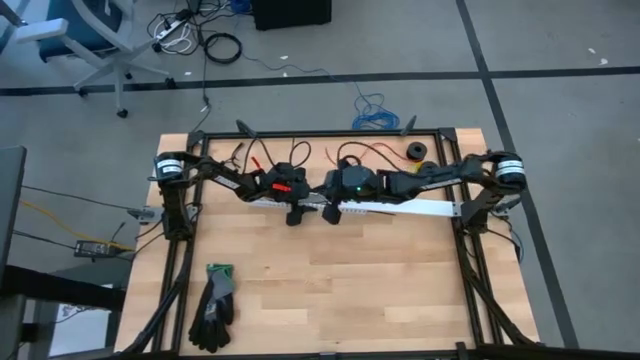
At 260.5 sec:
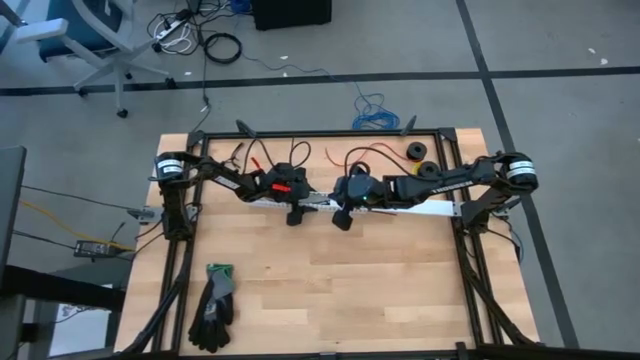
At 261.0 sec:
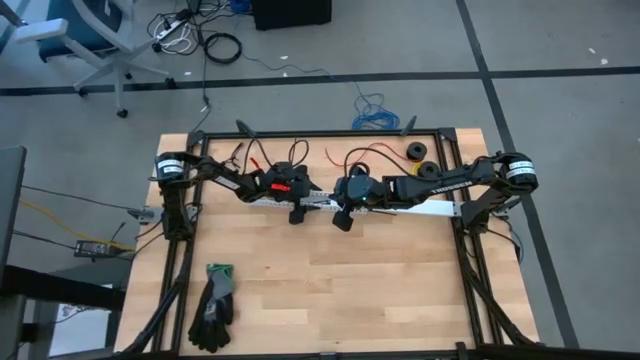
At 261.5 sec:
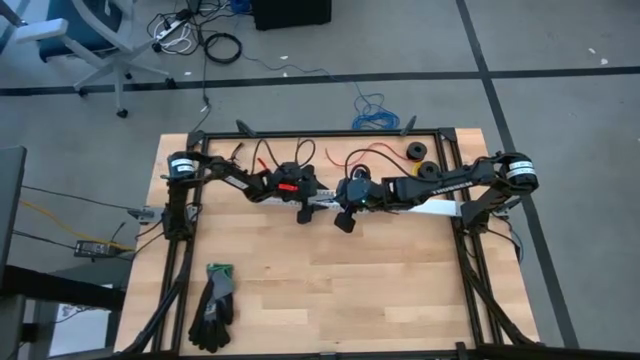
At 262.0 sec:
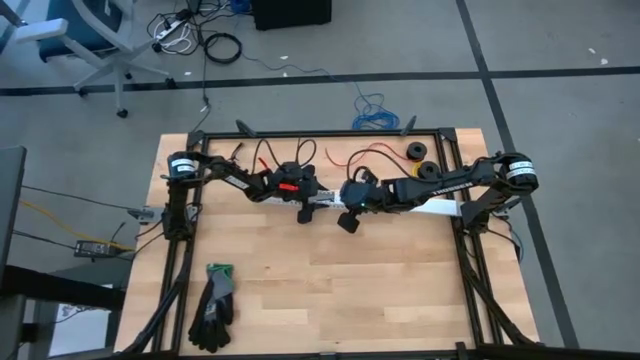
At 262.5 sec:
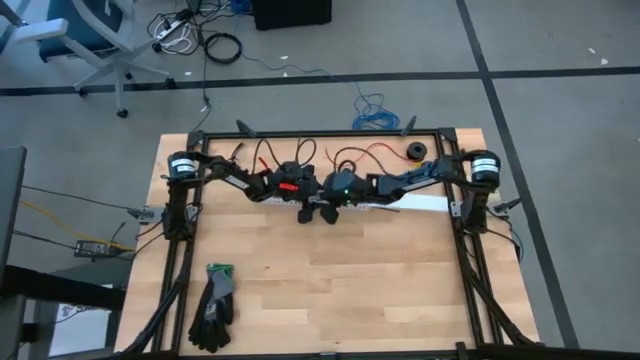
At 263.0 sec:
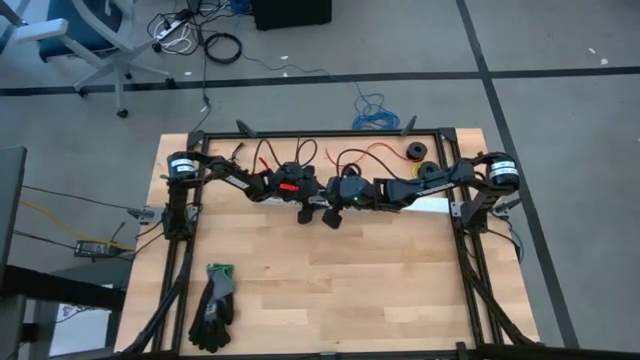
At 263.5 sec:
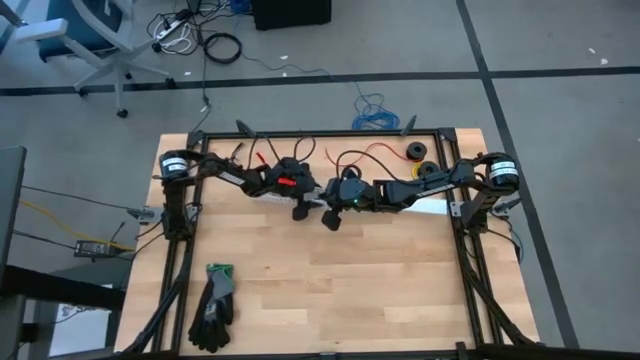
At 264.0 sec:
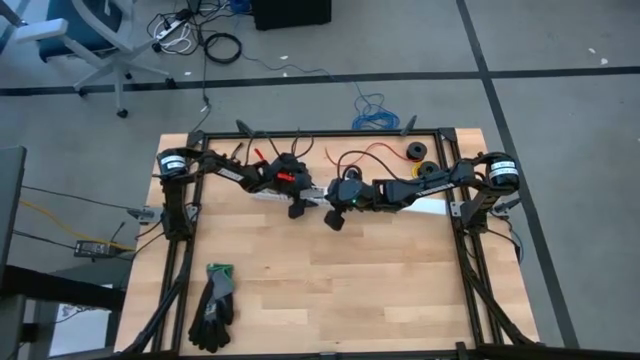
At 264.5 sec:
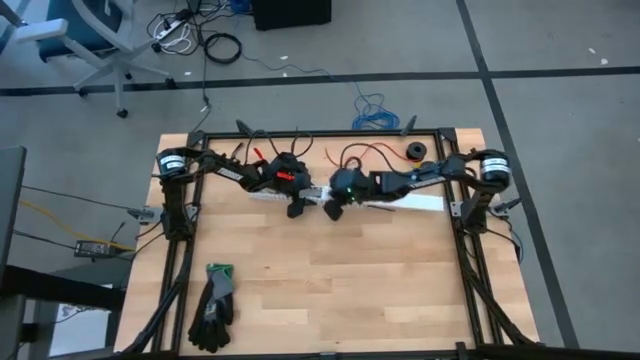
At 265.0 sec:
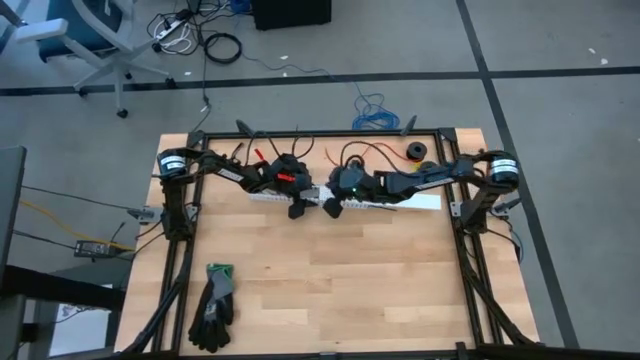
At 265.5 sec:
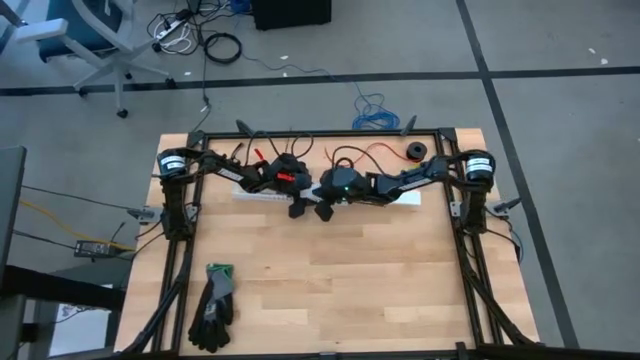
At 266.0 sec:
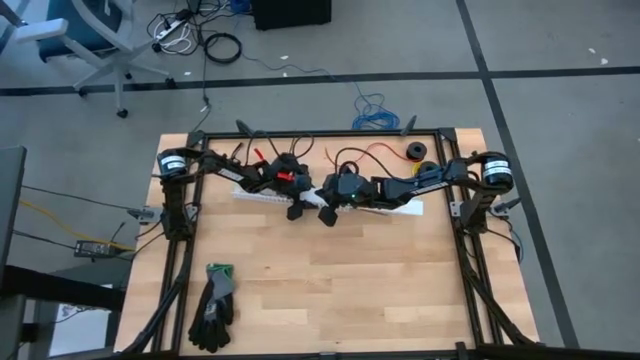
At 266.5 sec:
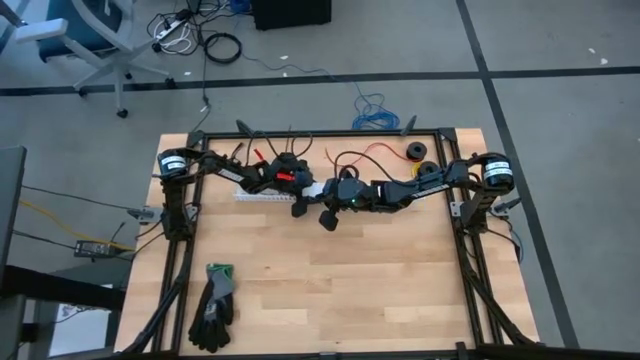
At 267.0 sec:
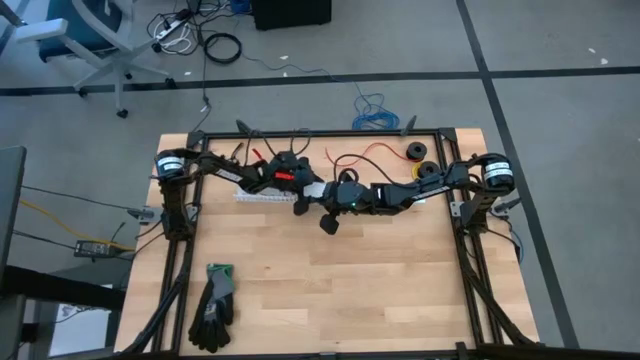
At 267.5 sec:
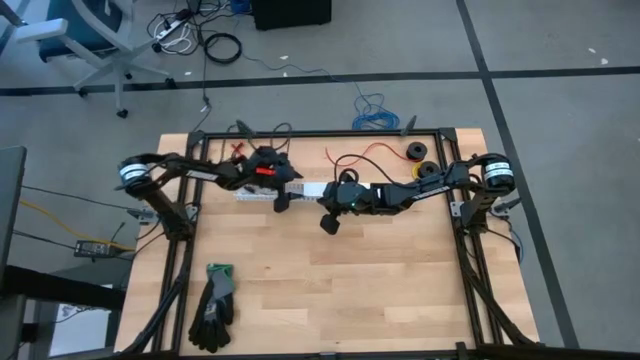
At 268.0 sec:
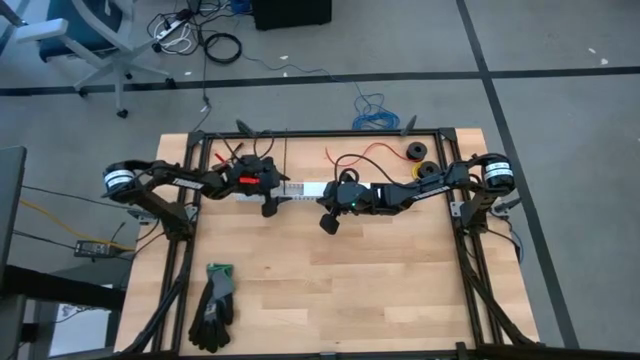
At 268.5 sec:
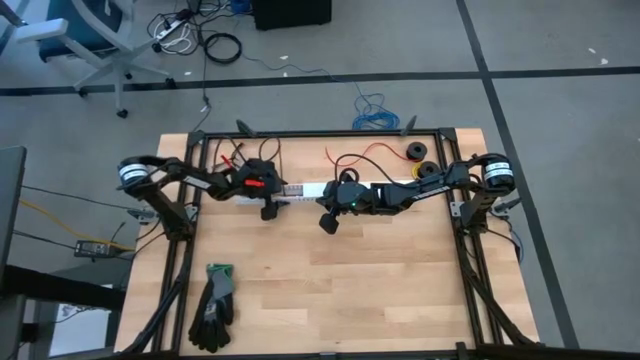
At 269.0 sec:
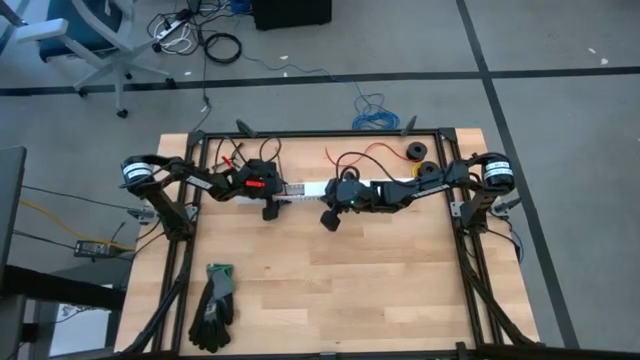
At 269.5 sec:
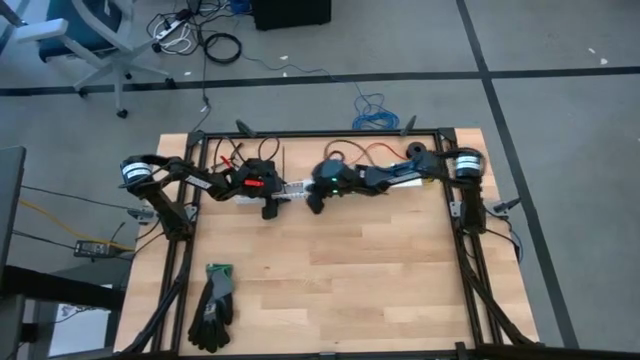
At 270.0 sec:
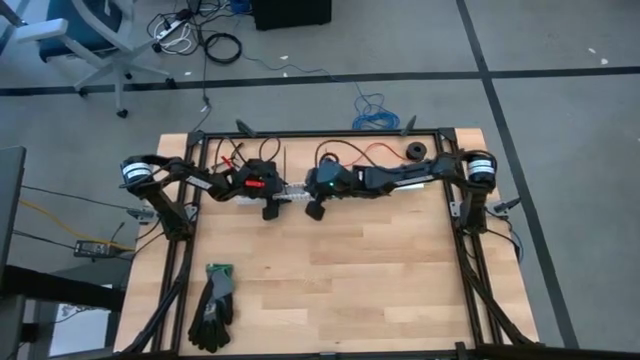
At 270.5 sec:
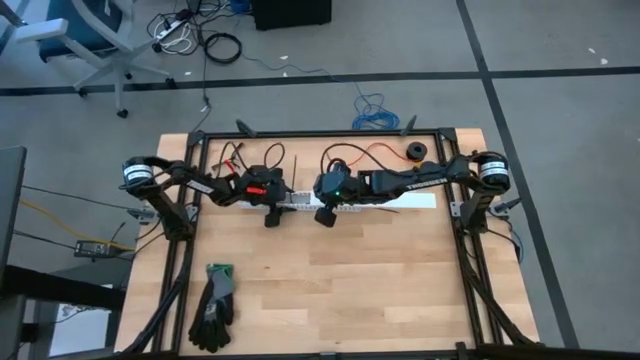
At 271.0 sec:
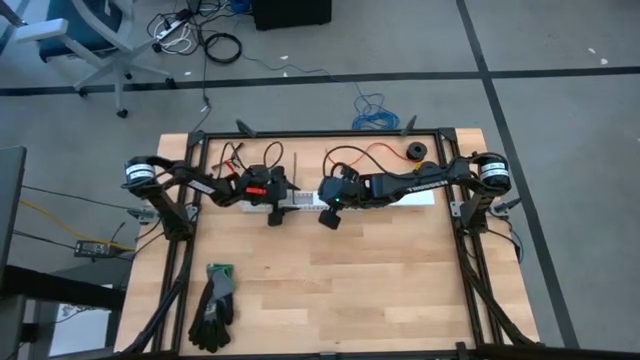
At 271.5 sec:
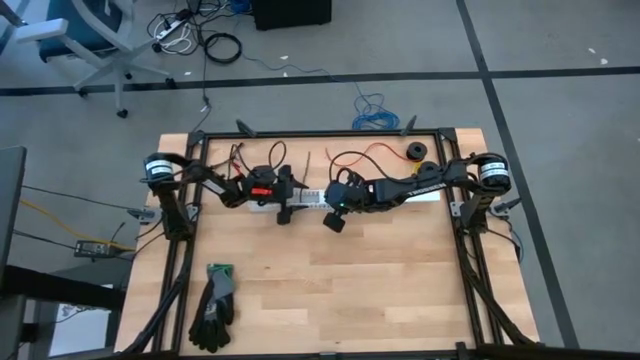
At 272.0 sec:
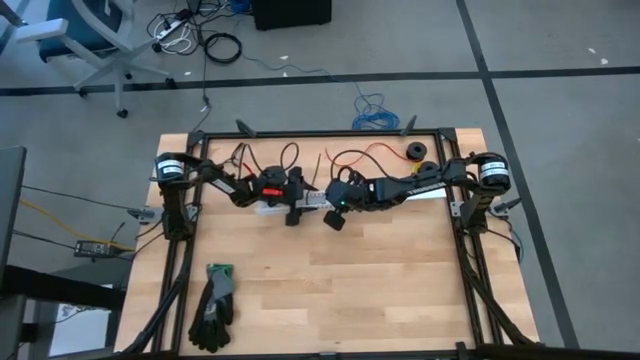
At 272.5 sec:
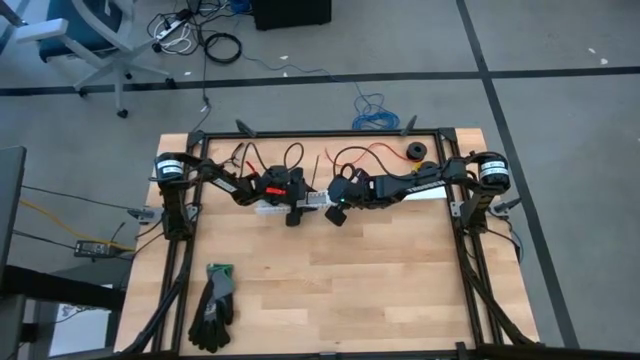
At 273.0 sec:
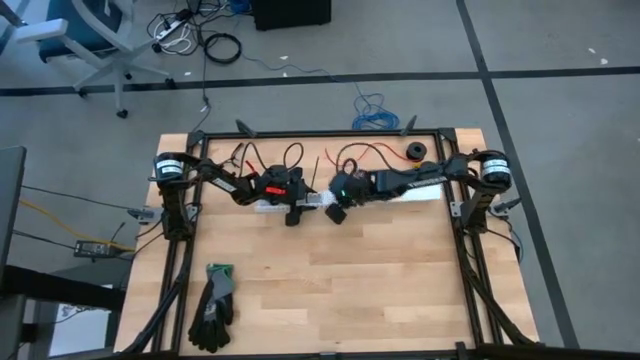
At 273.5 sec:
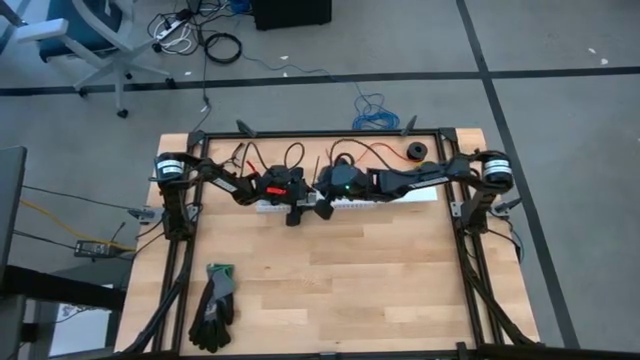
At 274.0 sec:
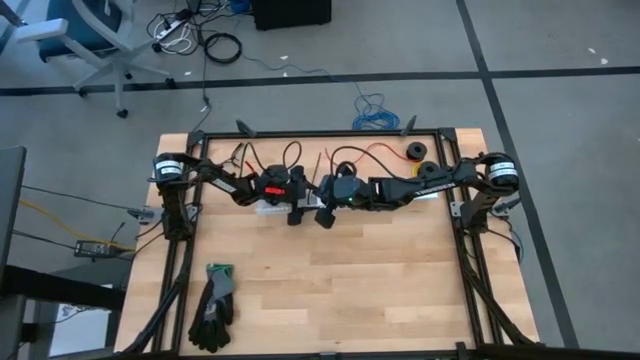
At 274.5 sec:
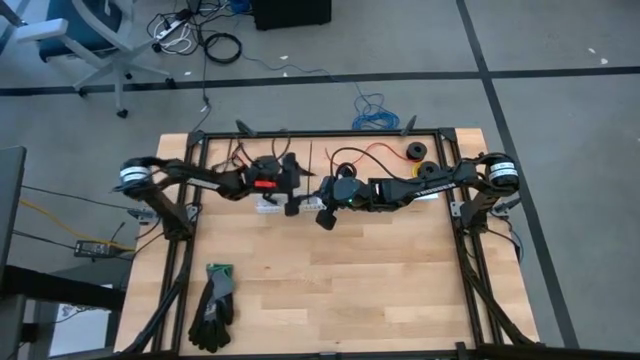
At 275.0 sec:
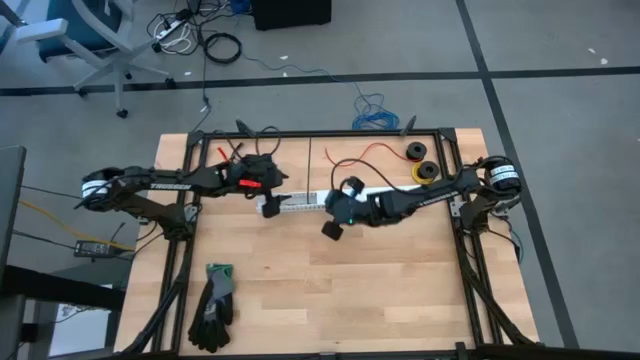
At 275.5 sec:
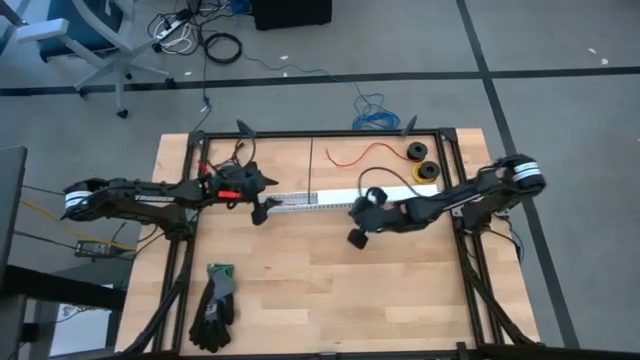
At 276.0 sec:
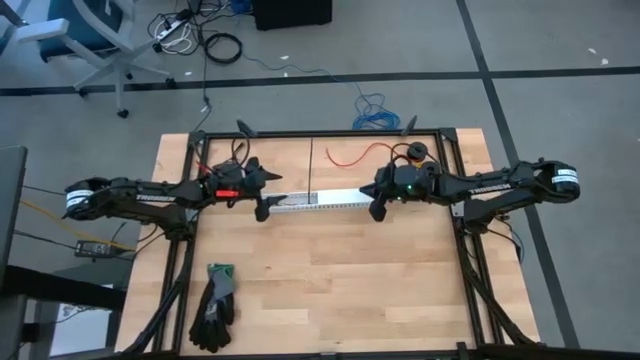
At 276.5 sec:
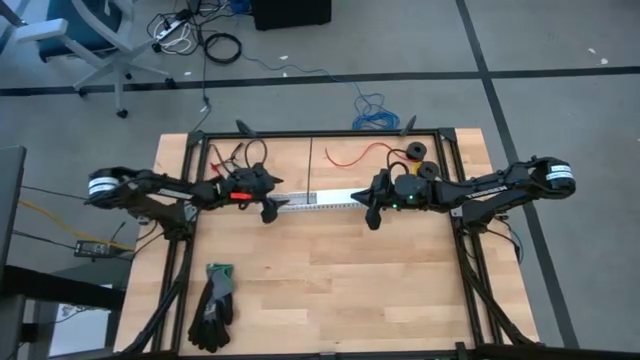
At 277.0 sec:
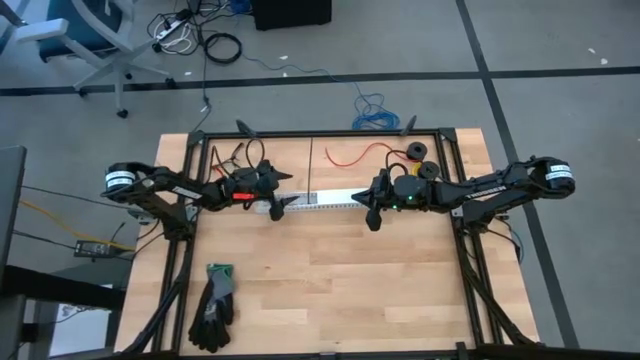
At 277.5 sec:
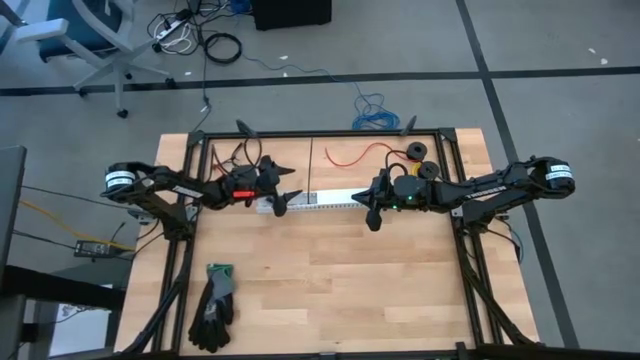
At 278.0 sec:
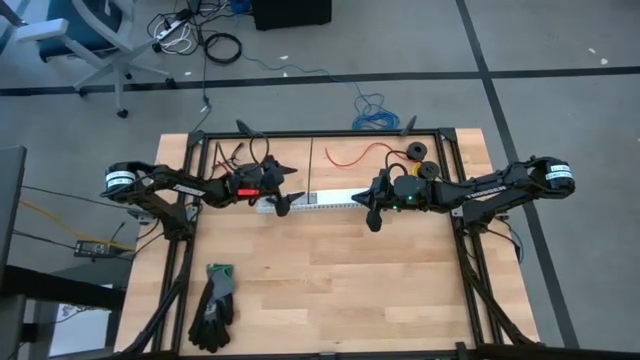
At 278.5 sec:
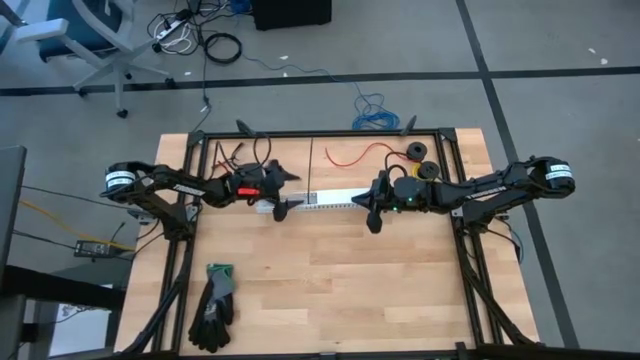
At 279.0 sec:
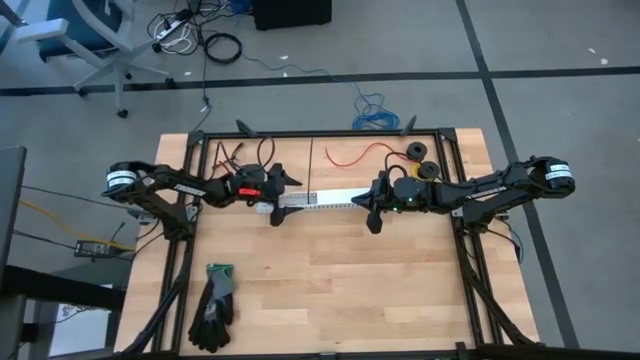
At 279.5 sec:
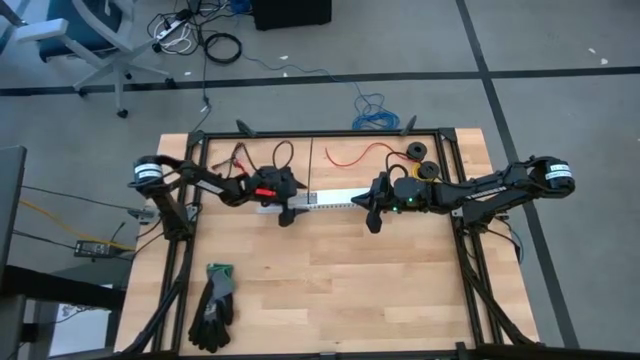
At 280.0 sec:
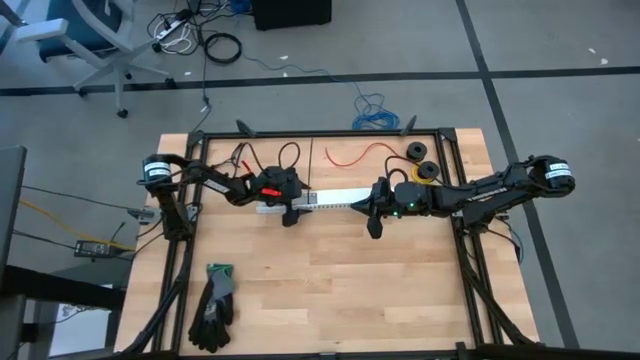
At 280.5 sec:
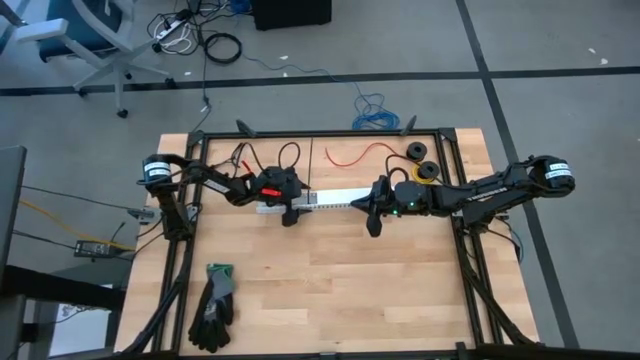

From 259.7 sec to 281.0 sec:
Task: Ziptie cables
Close the cable duct with the cable duct lid

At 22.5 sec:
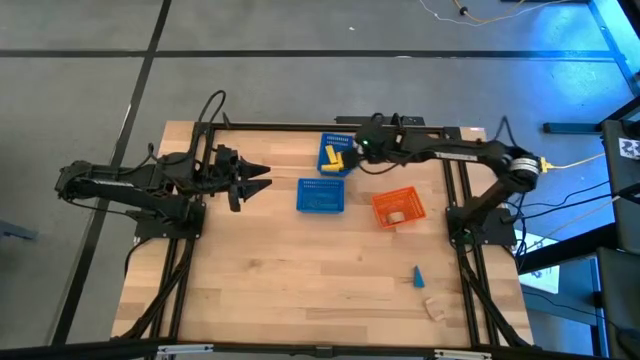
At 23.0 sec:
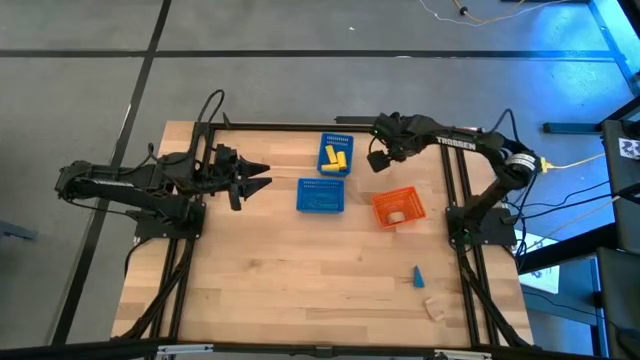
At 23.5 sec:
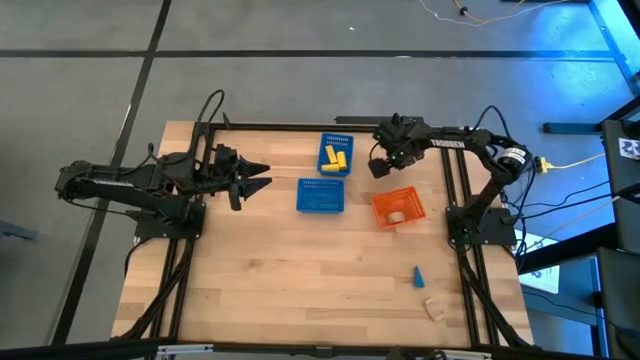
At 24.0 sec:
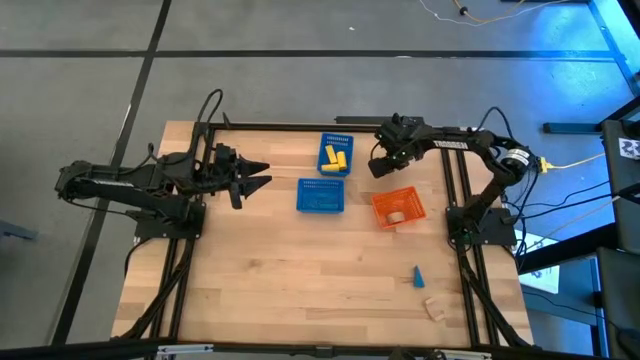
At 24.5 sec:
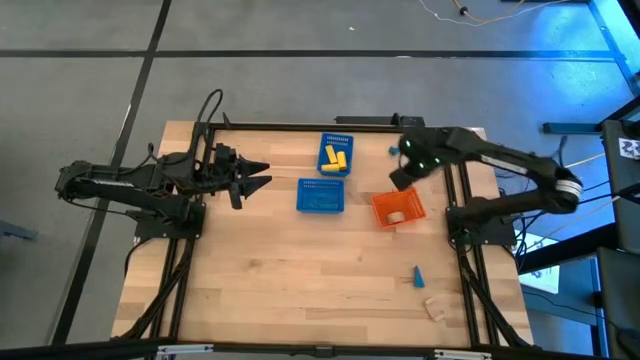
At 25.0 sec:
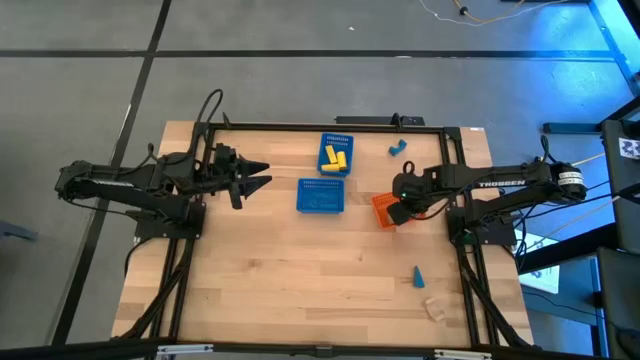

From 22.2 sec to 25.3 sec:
Task: Sort & place blocks by color
Put the top light brown block into the orange basket
